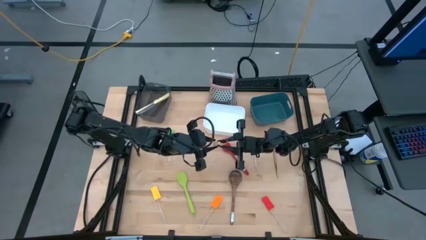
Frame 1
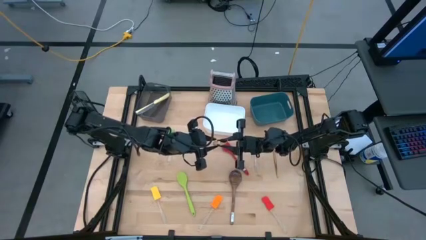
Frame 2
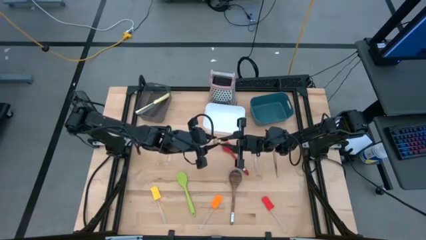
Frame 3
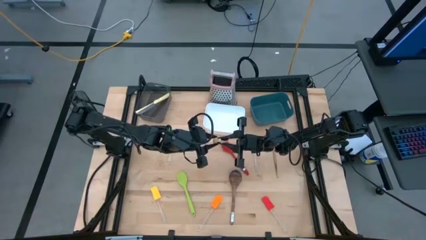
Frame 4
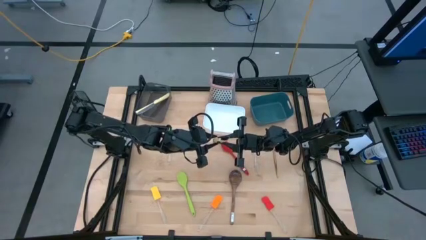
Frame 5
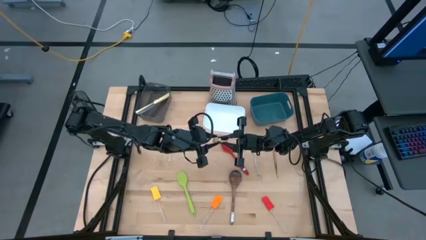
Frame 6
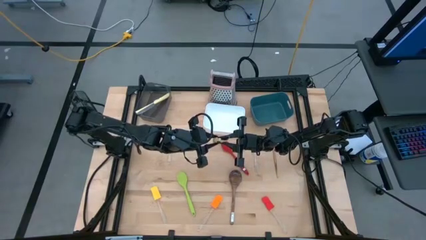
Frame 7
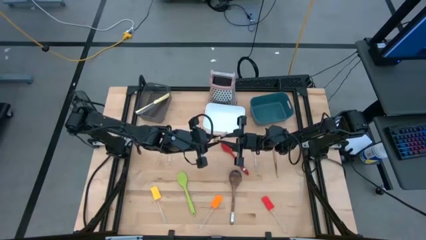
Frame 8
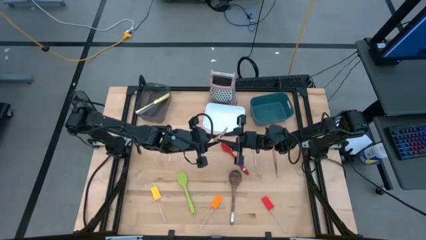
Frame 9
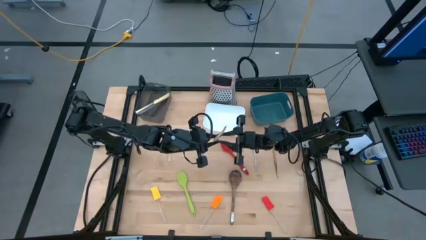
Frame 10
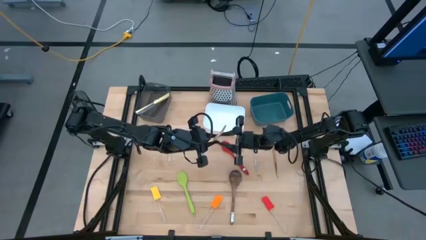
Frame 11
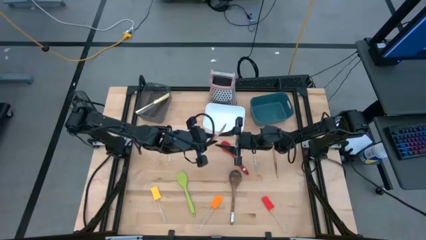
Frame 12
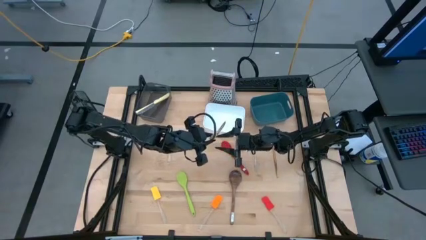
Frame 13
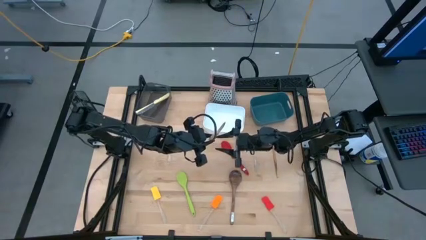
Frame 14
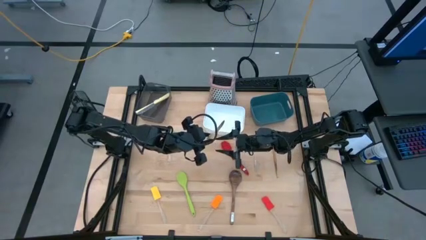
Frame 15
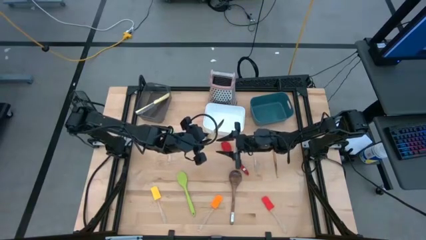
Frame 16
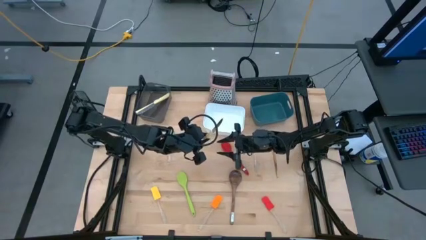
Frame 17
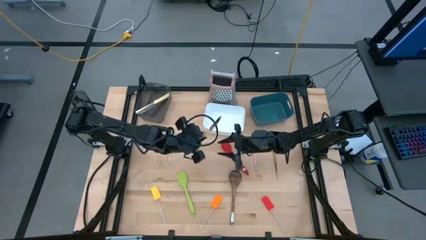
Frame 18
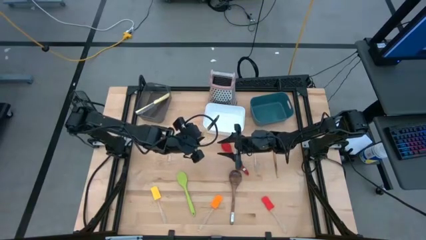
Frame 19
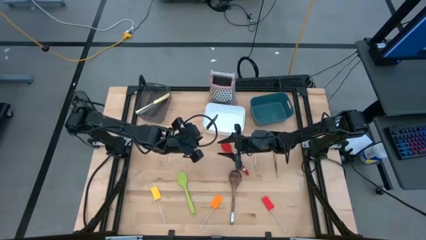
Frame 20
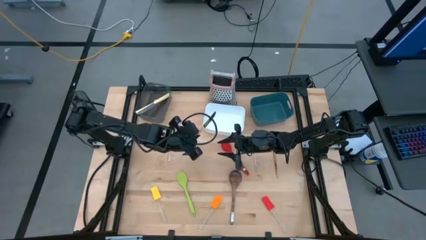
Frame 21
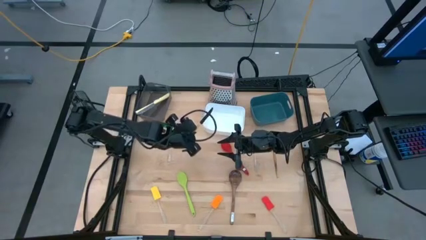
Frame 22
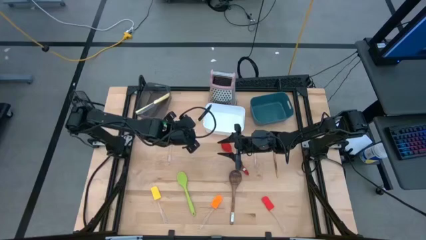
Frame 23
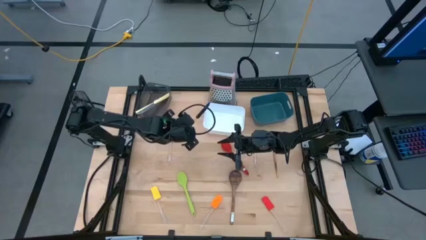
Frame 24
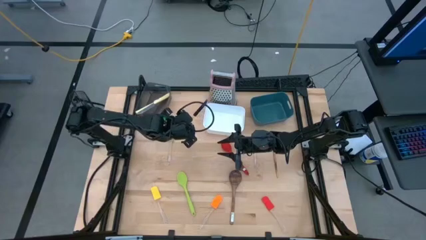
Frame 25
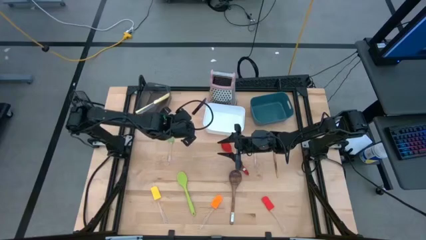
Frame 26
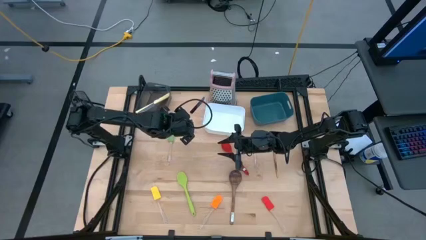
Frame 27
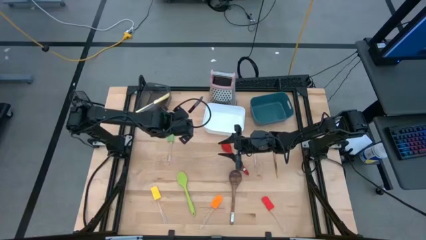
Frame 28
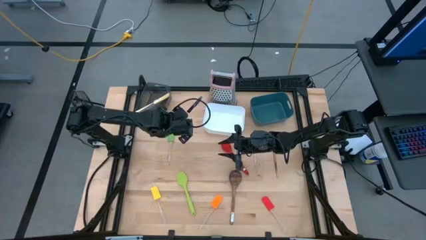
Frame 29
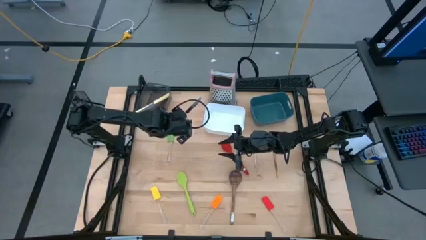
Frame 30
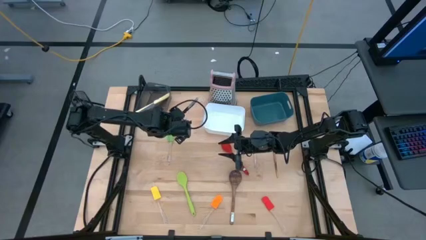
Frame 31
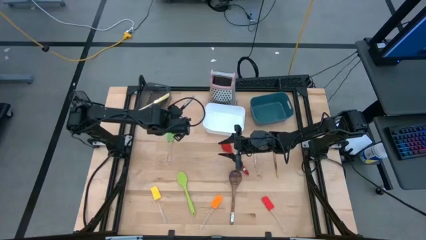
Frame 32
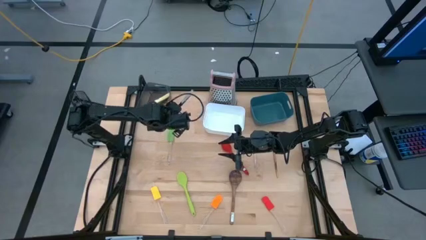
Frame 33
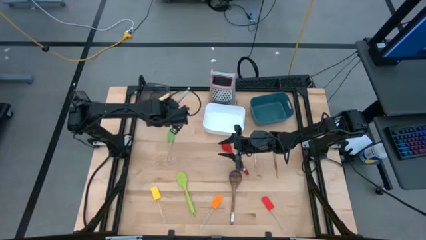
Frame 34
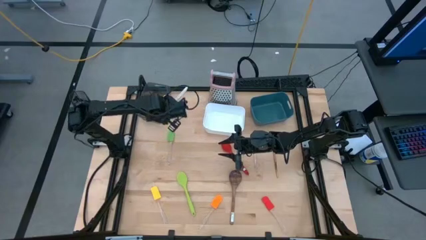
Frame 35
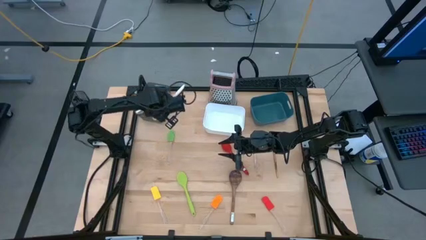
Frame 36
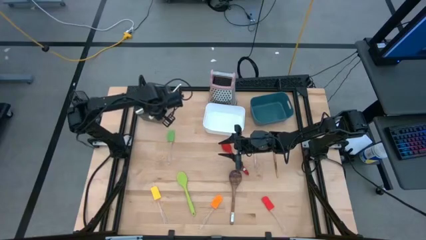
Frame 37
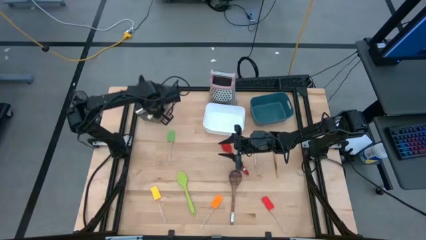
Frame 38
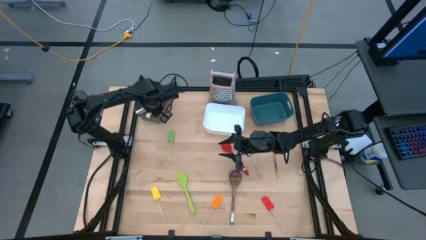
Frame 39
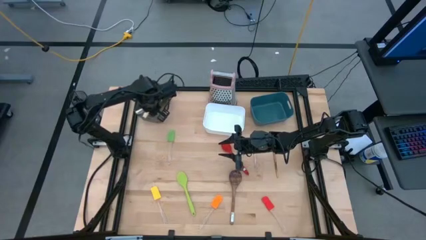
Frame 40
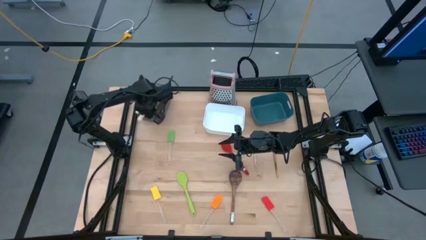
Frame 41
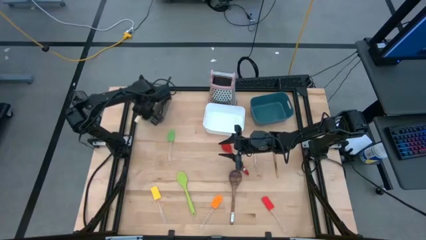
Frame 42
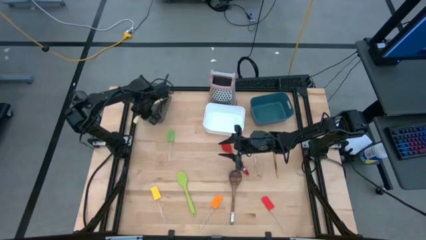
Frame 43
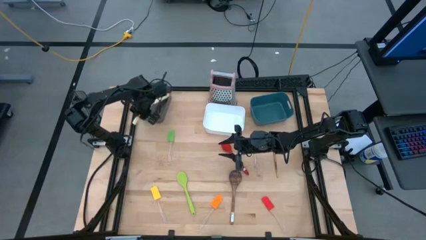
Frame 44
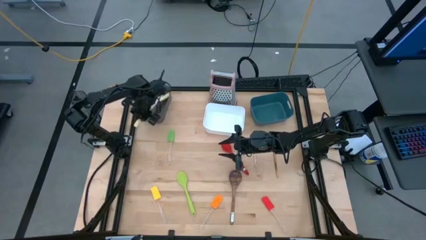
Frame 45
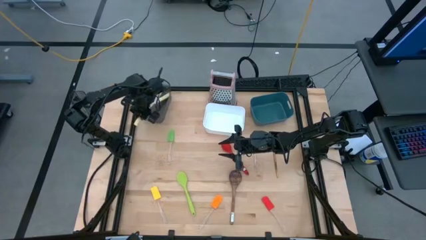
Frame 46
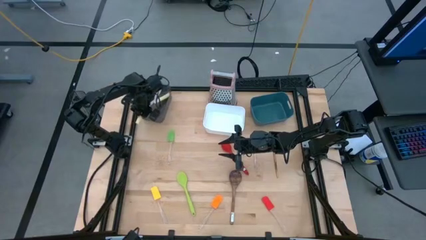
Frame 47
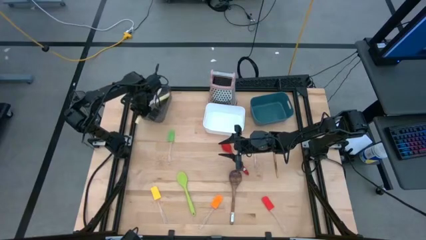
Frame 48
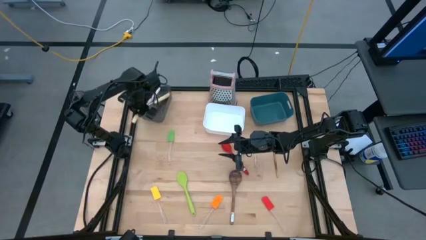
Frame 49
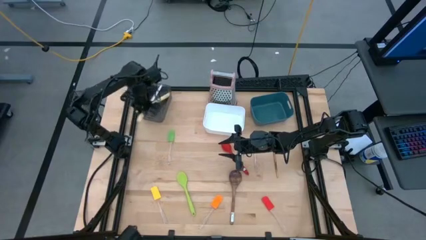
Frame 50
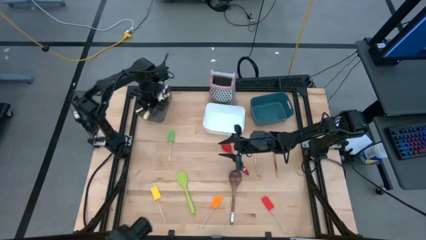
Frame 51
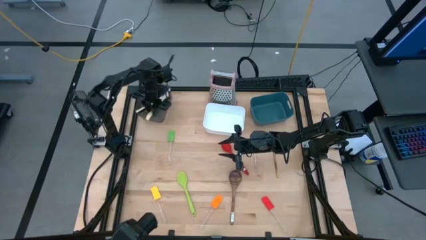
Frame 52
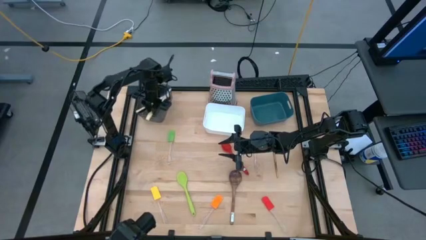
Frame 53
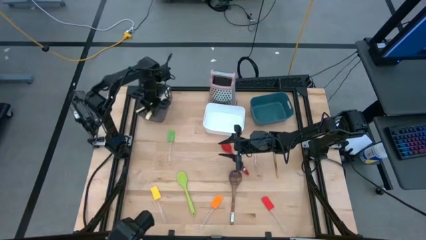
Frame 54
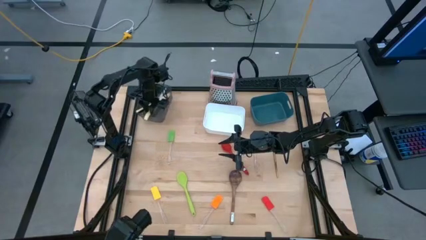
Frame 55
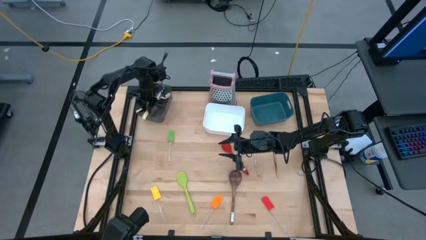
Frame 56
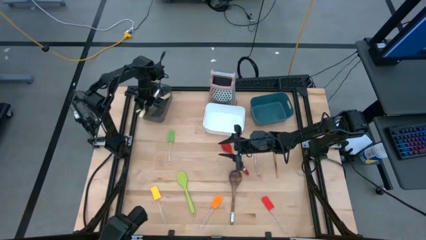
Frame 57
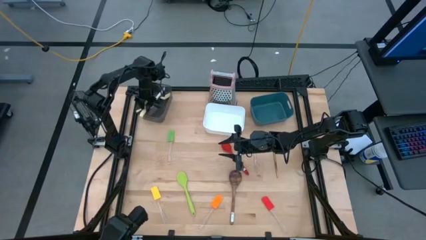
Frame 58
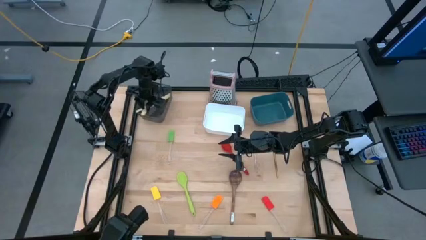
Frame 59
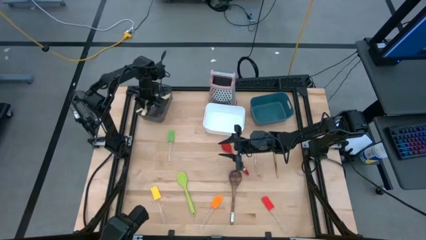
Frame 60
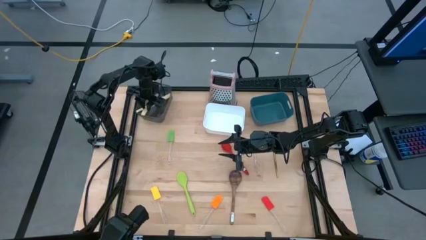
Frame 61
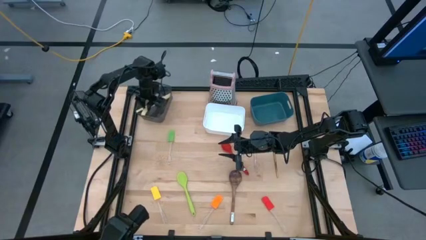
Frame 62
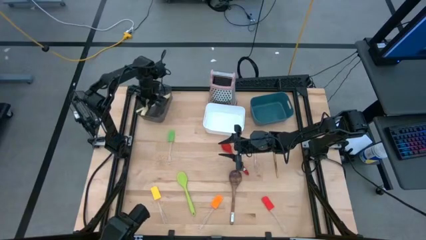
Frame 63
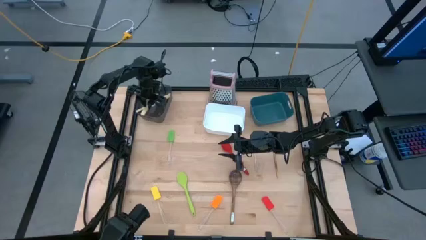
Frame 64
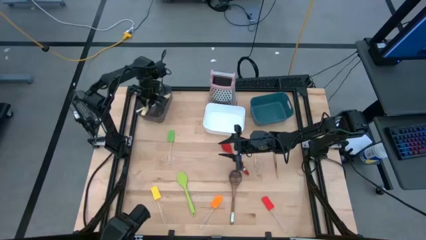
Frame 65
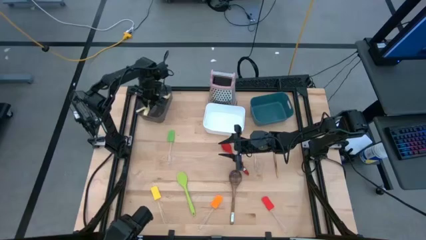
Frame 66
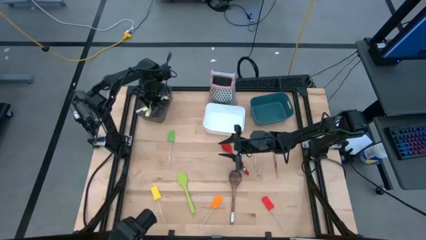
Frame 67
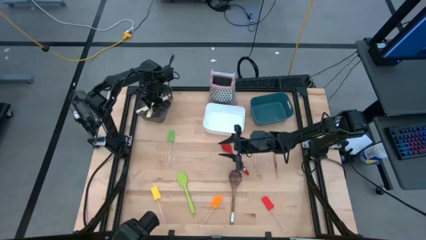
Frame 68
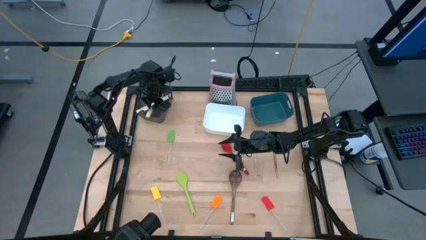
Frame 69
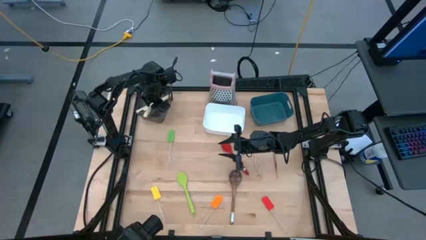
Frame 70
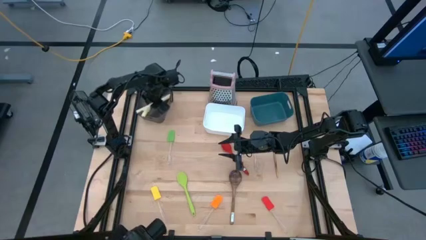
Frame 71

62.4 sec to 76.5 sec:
Task: Pick & Place Kitchen Items
Put the yellow knife into the black bin

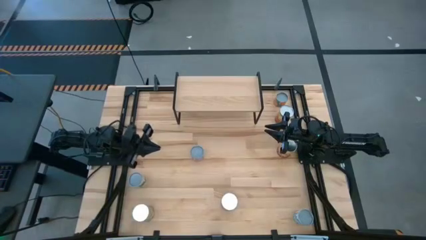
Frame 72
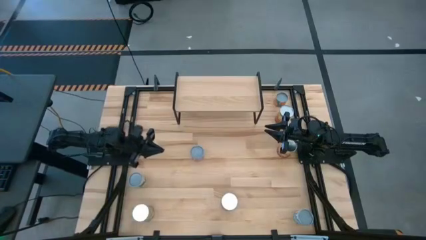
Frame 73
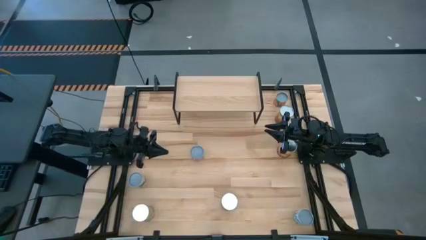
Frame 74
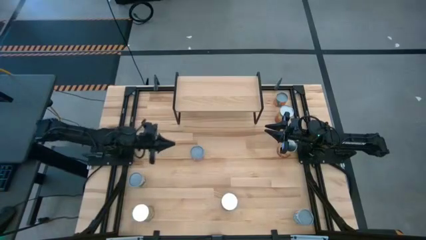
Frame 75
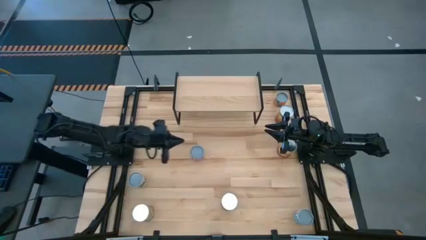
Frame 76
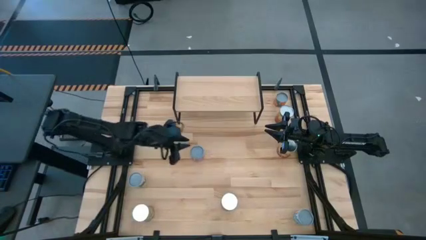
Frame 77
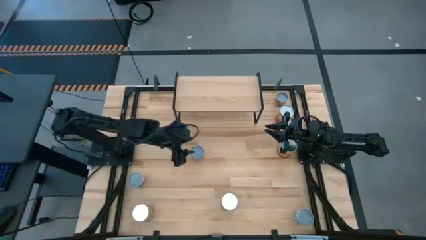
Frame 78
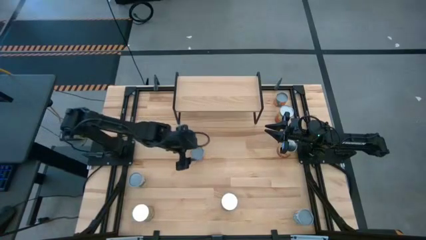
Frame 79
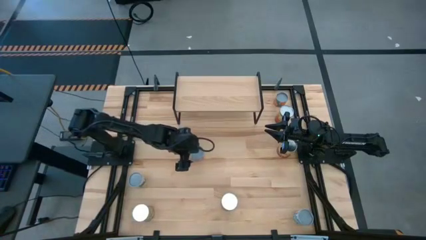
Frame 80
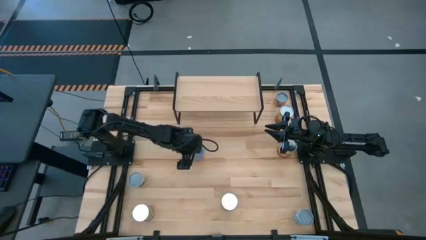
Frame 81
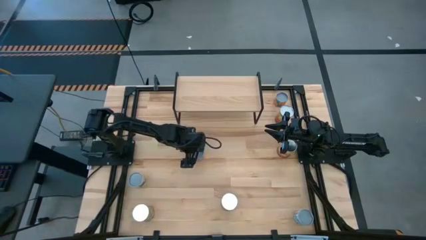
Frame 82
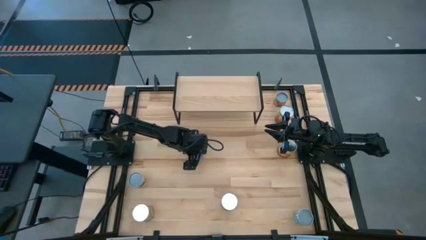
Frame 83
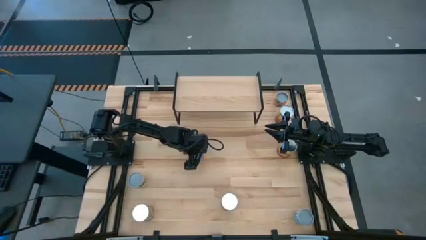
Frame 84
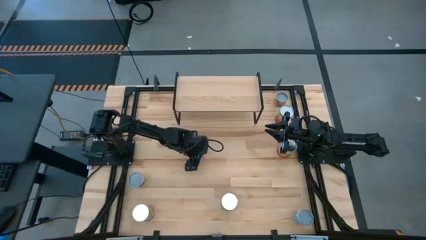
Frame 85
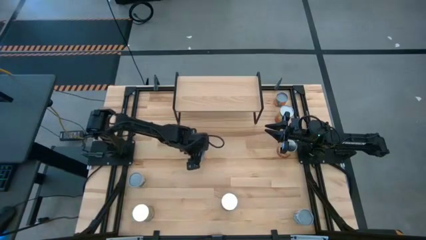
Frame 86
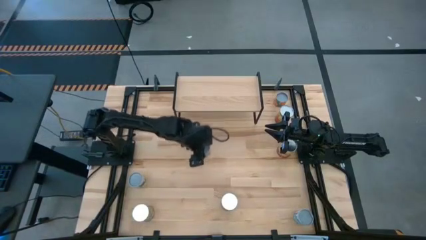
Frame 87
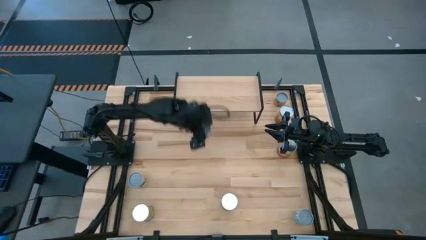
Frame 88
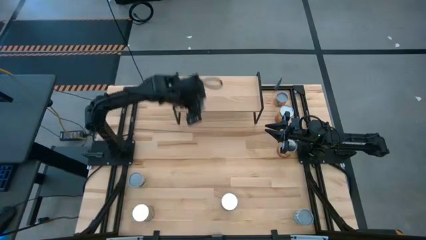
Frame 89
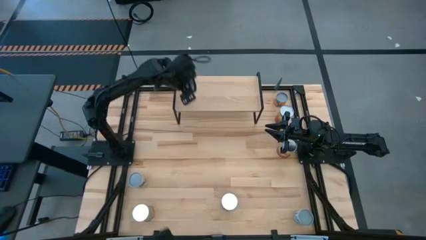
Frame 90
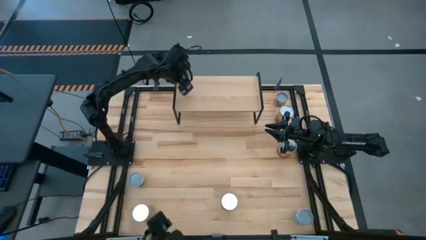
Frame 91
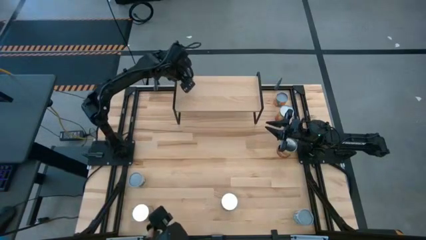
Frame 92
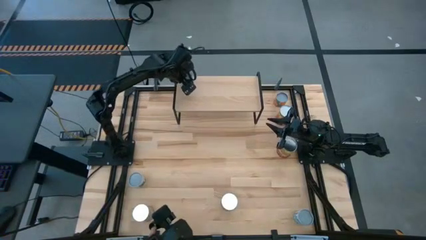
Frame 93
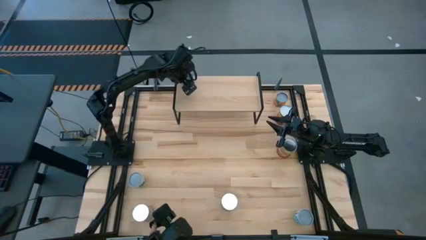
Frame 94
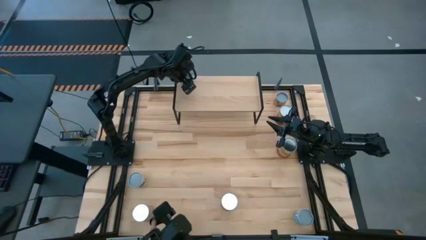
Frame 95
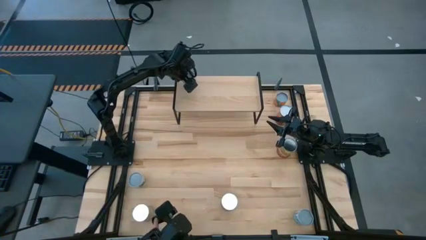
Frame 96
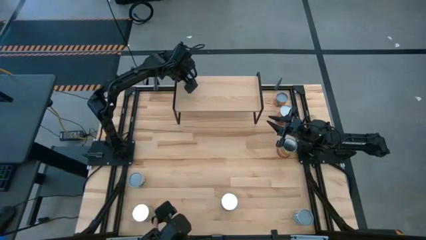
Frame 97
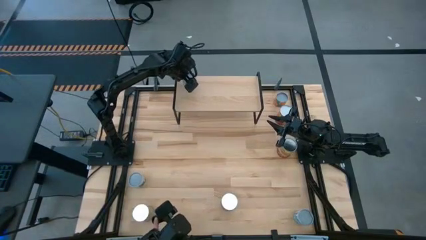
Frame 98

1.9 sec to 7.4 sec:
Task: Pick and place cans onto a shelf
Put the can of corn on the shelf
